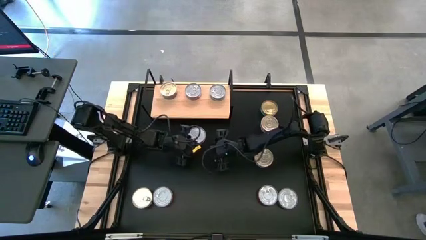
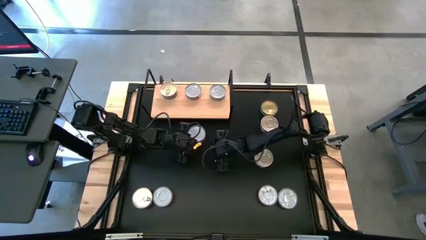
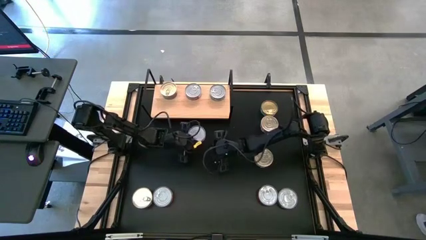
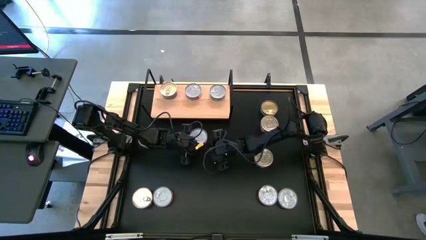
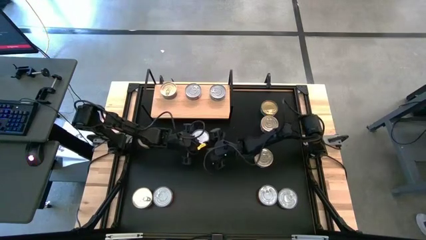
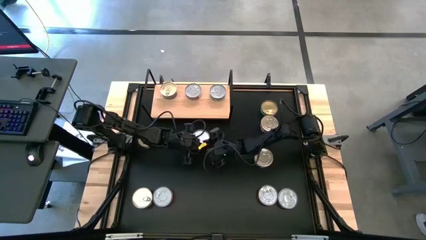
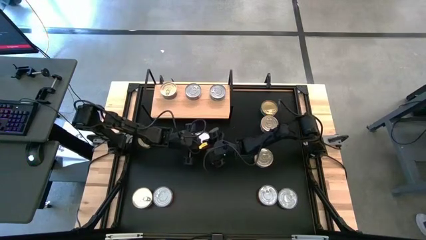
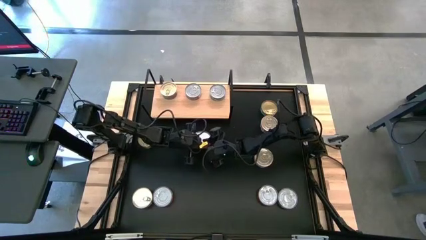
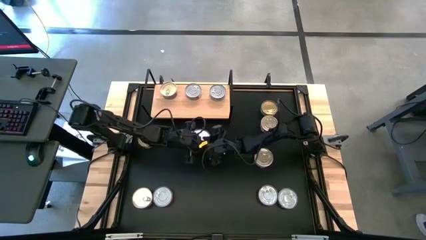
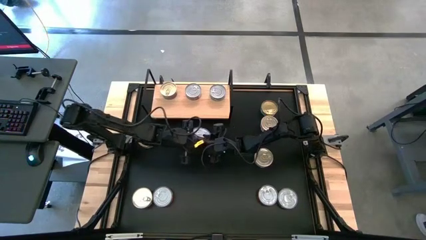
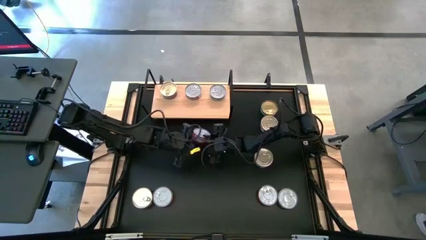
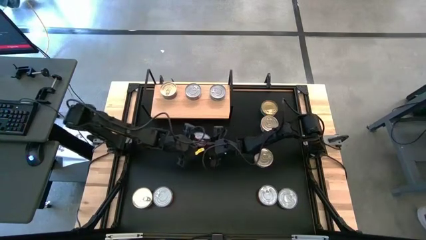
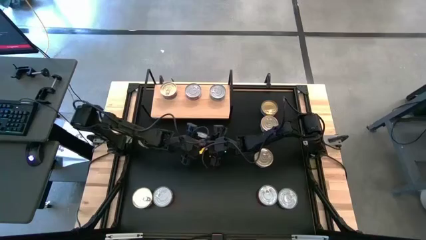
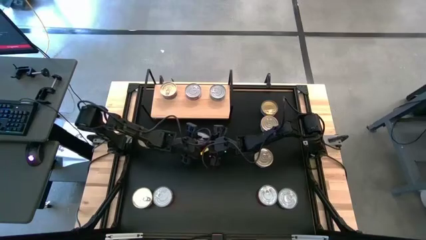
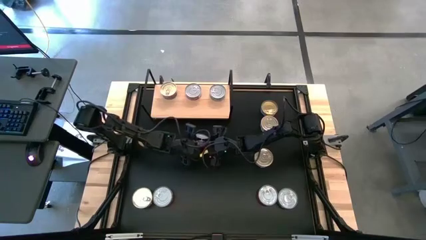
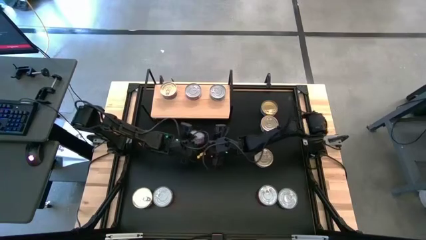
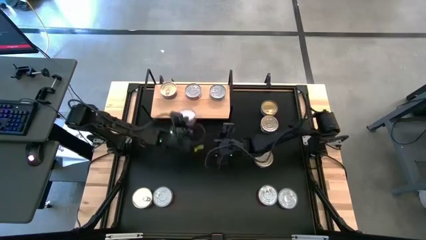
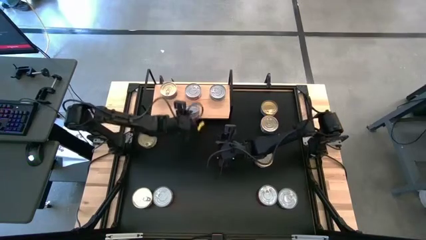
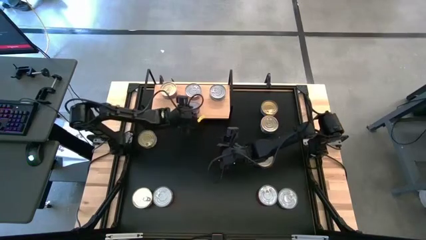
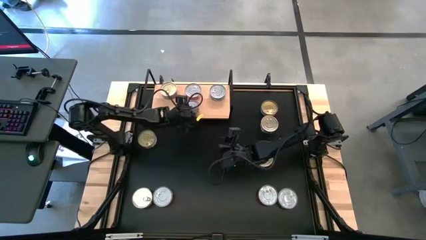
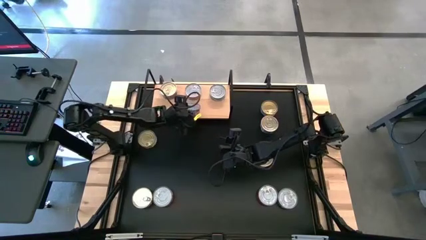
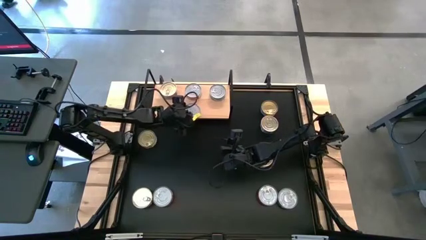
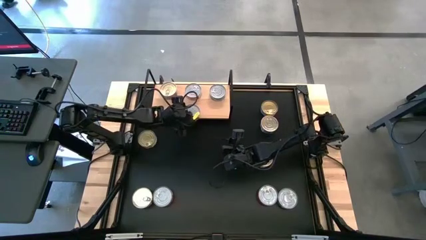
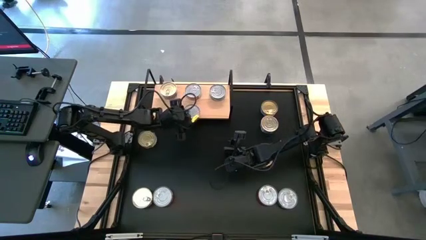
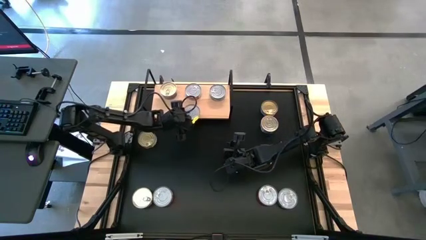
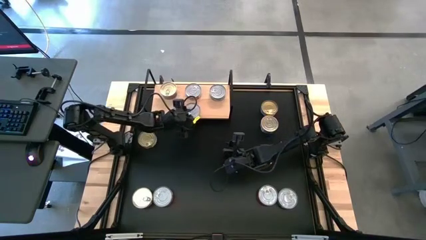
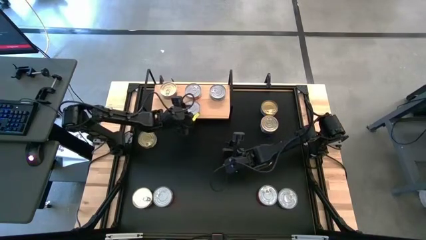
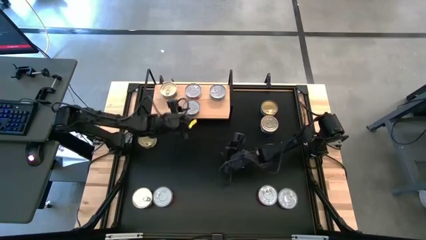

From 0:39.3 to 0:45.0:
Task: Stack canned seafood by type on shelf
Put the middle right red tuna can on the shelf and align it with the other red tuna can

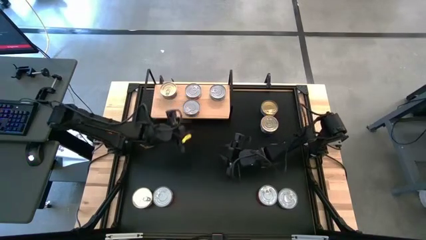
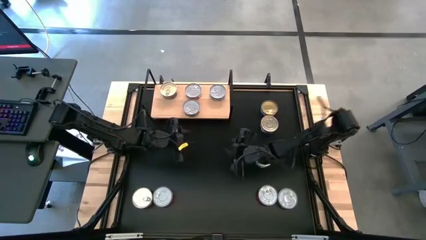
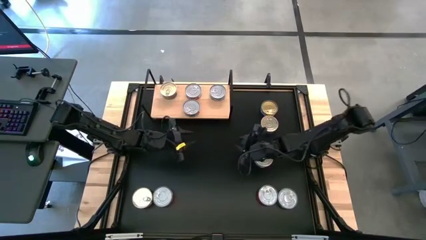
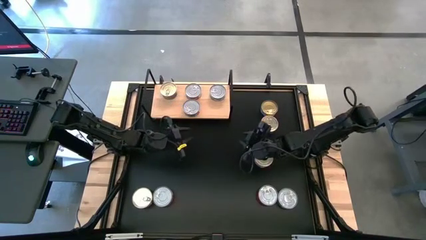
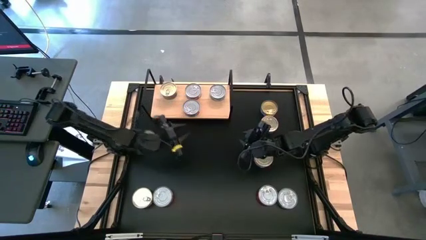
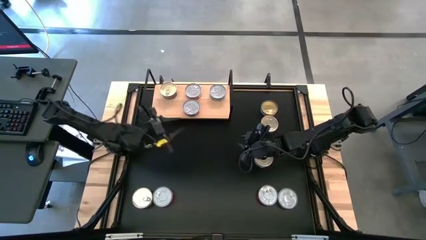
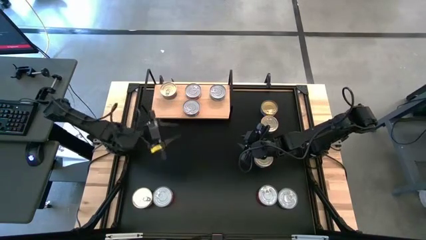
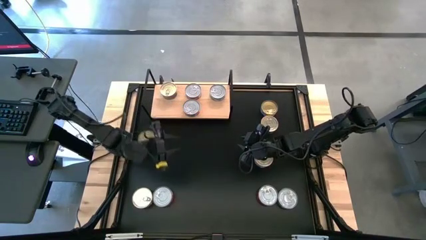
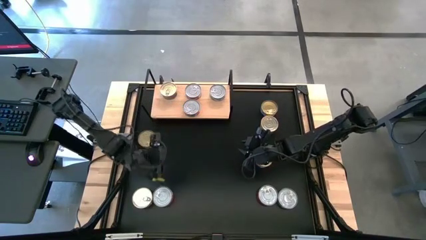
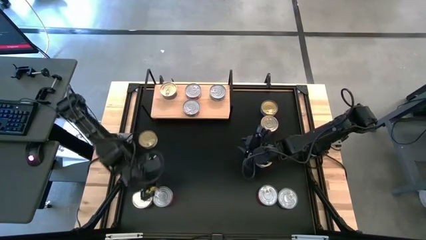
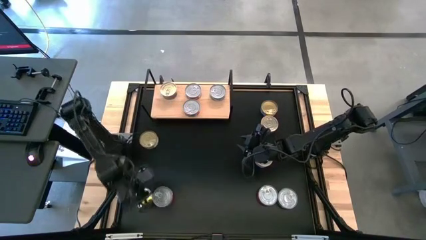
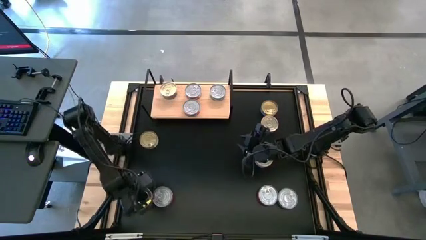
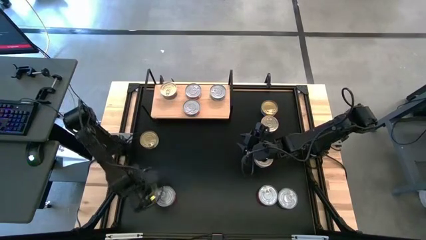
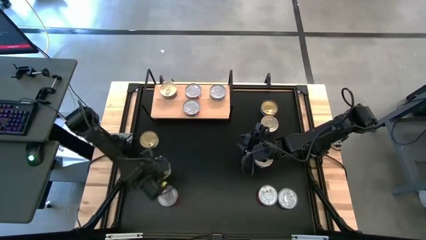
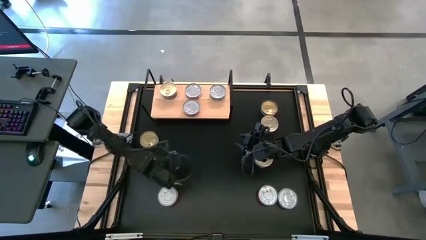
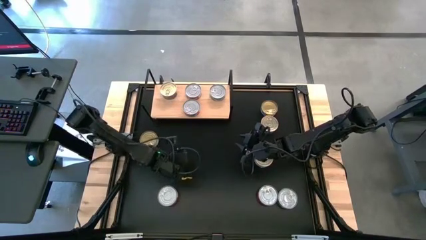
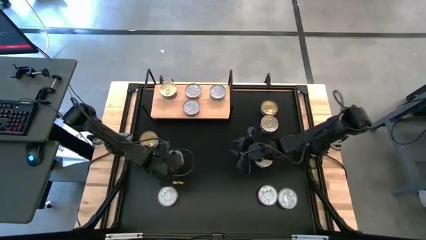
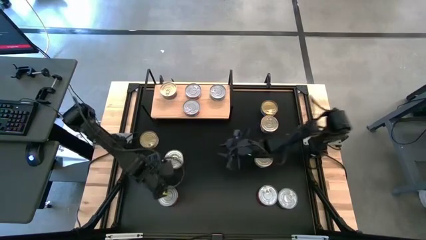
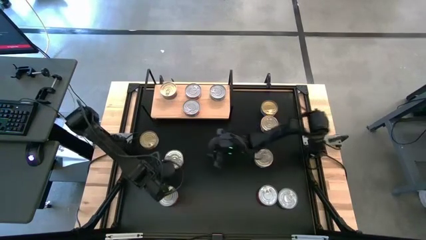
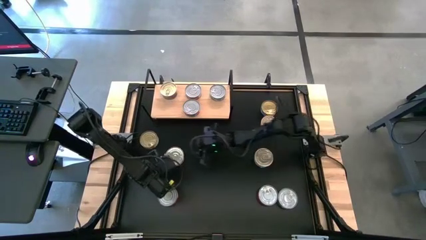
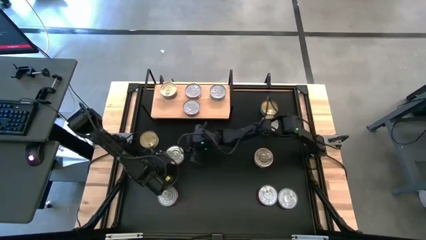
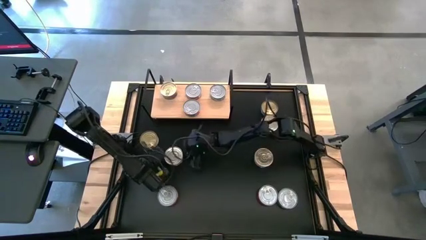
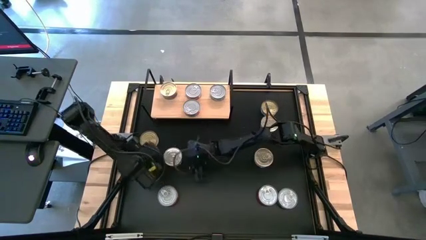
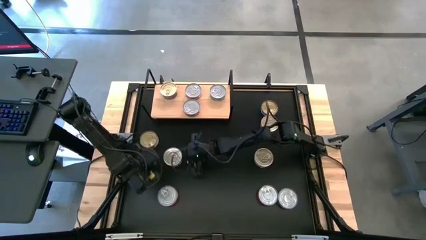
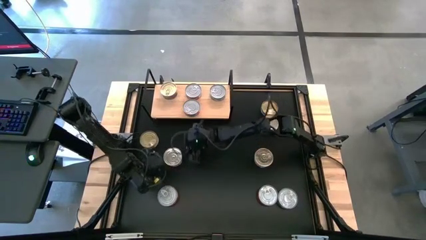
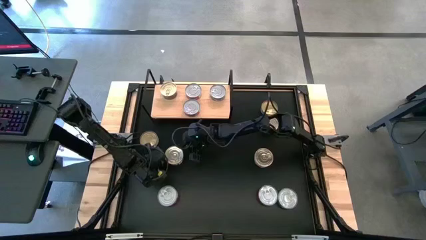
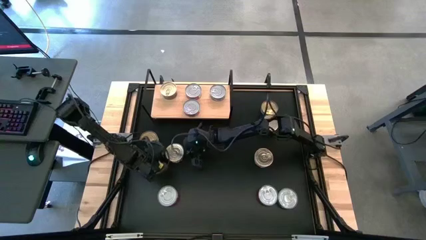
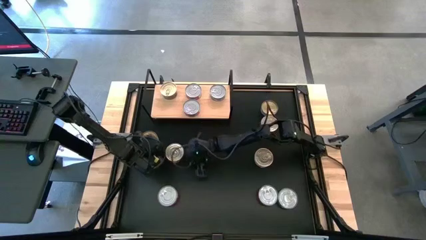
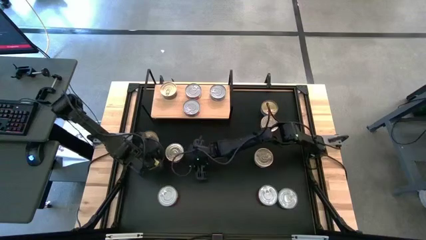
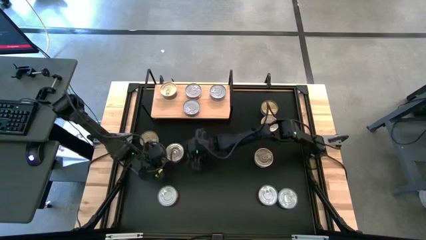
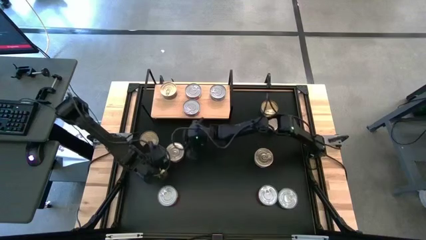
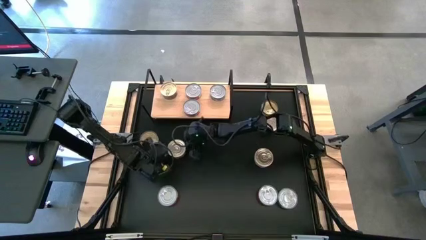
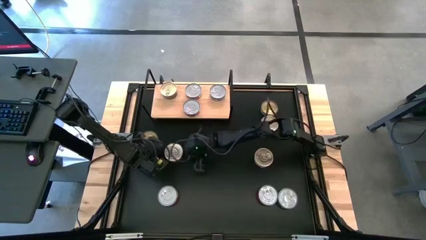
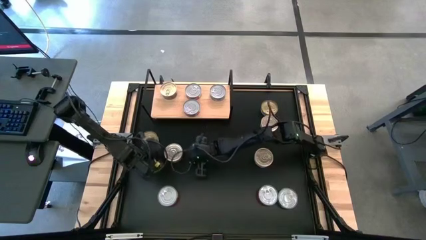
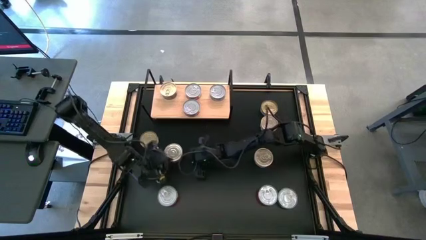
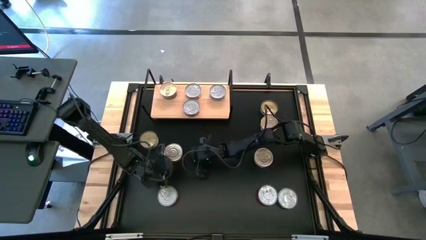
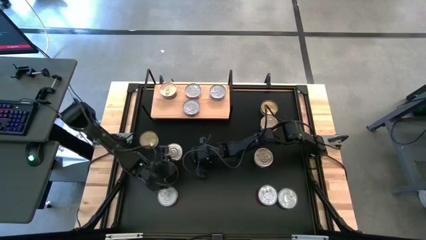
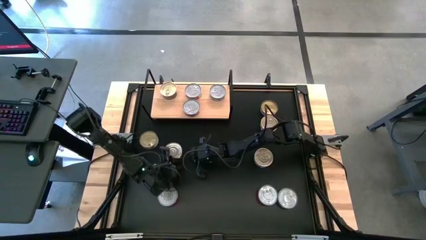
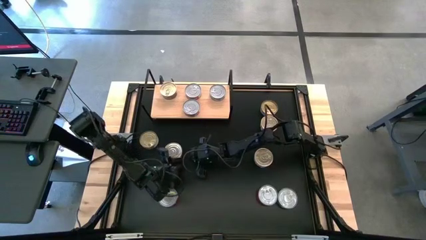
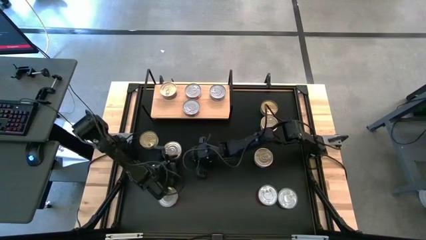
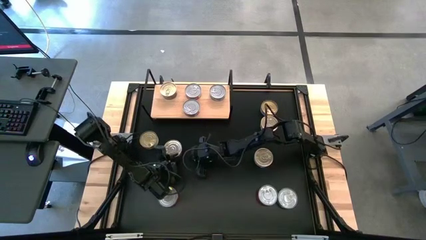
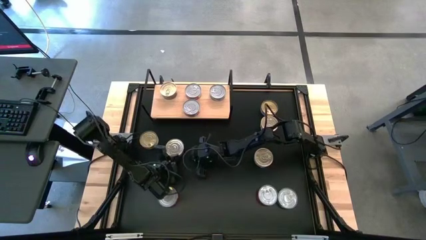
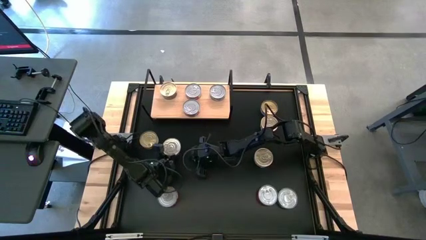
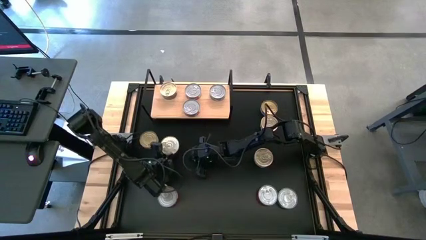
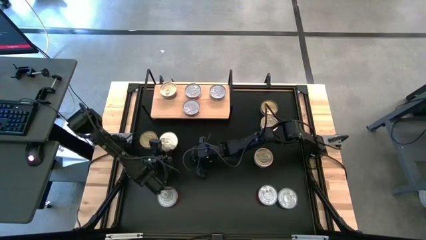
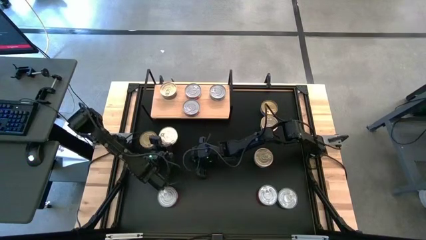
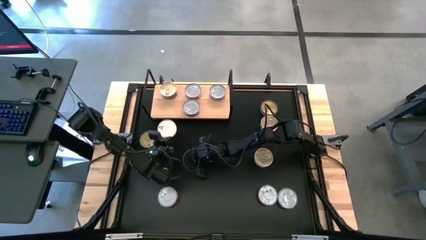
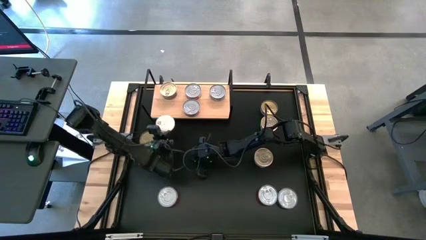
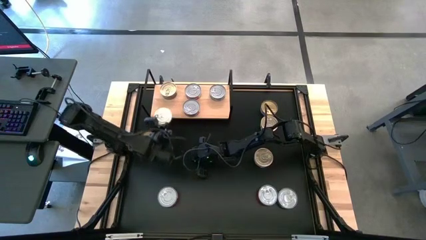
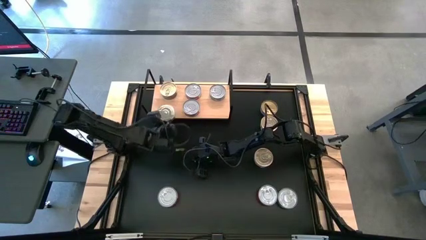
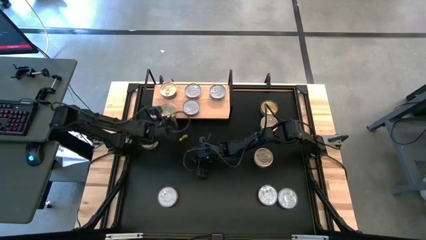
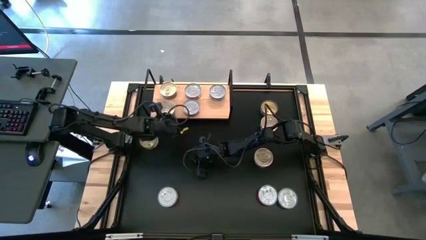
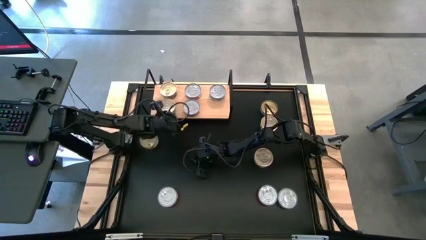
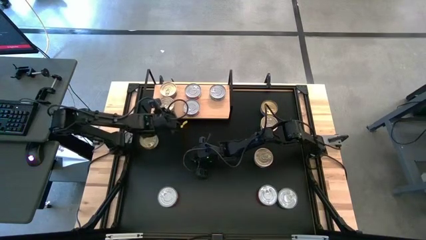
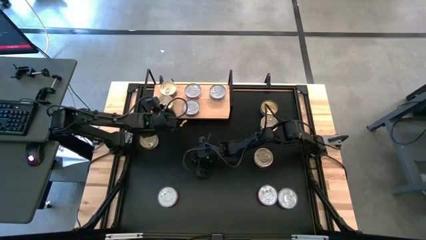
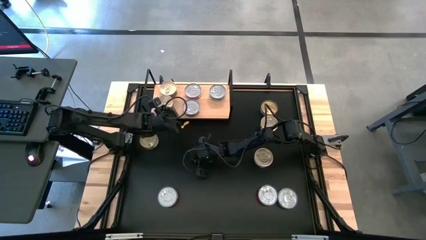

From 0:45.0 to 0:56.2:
Put the bottom left blue tuna can on the shelf and align it with the other blue tuna can
